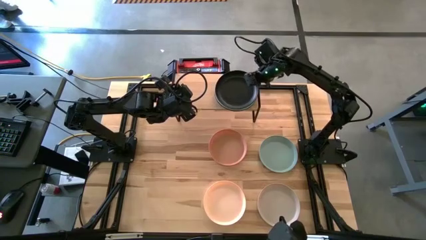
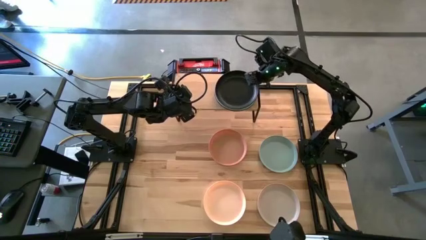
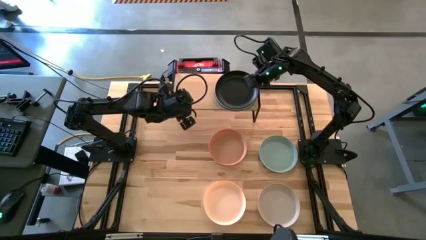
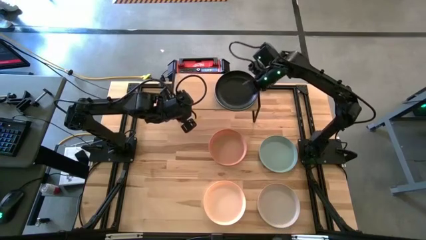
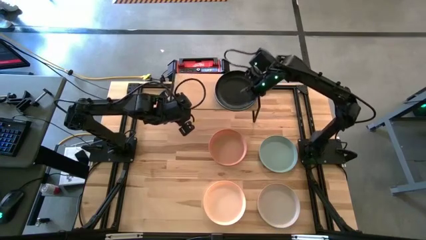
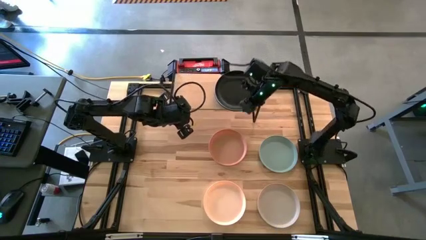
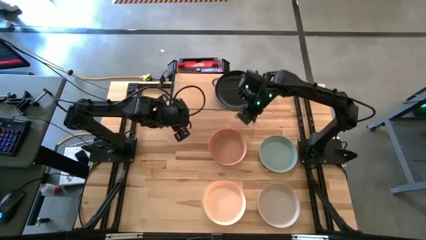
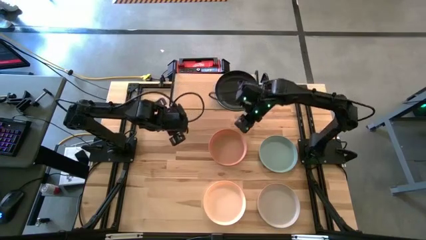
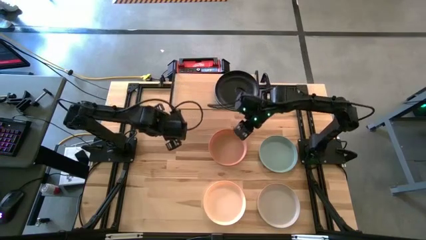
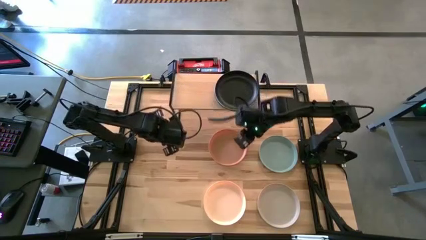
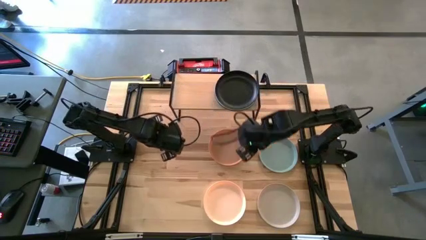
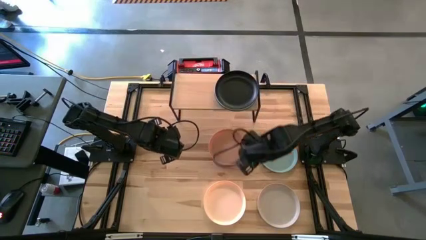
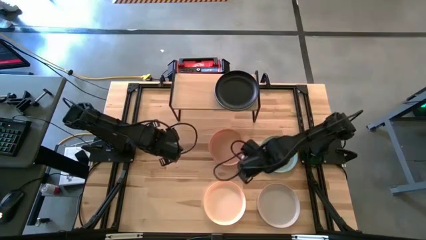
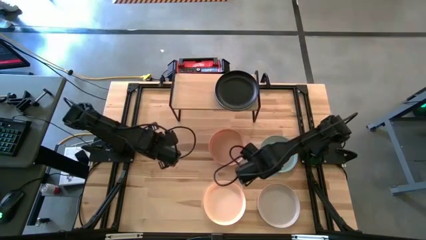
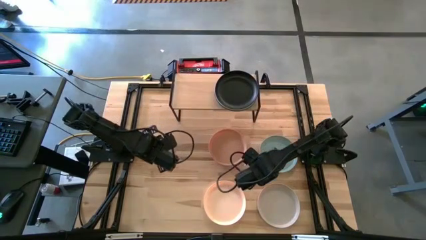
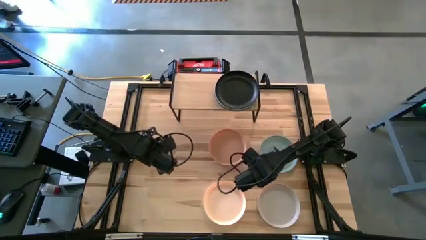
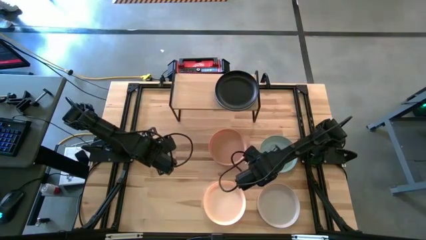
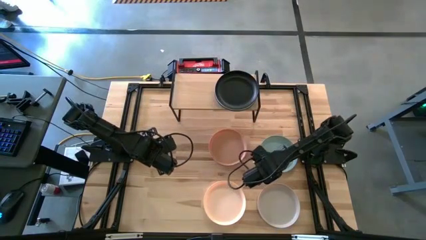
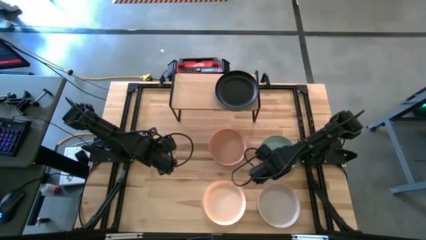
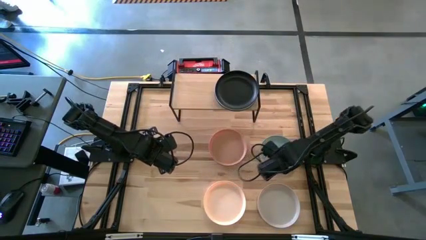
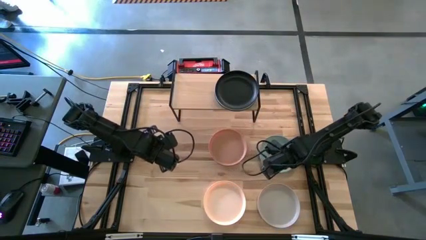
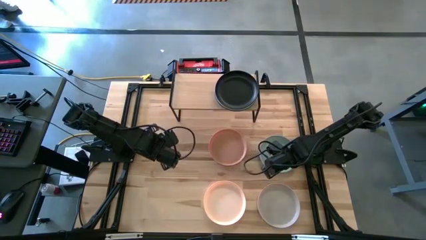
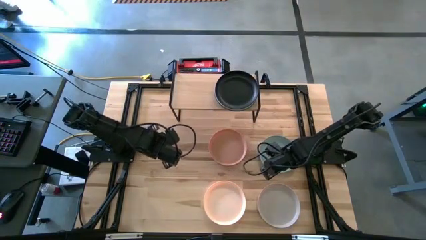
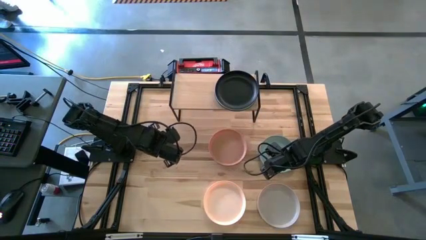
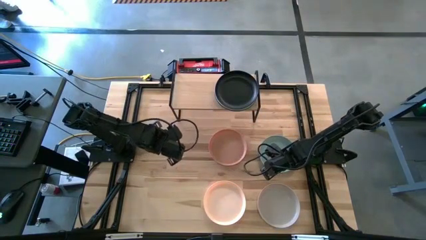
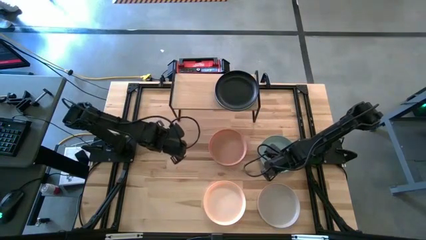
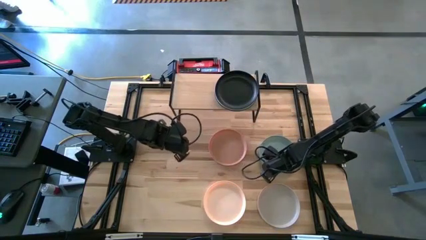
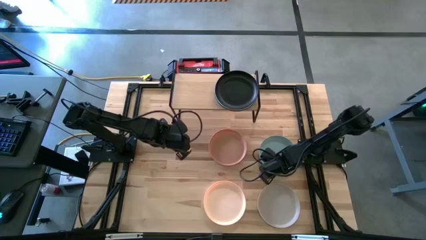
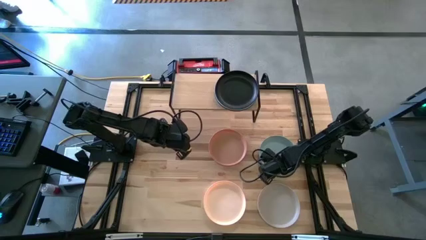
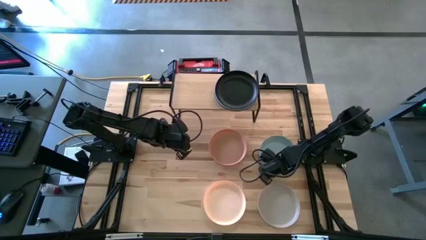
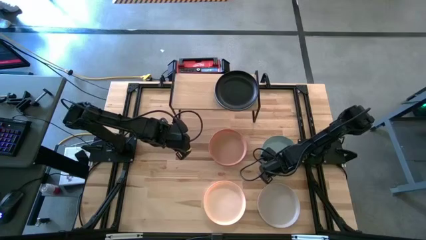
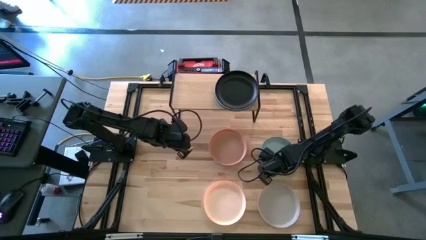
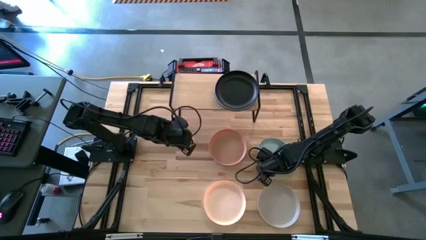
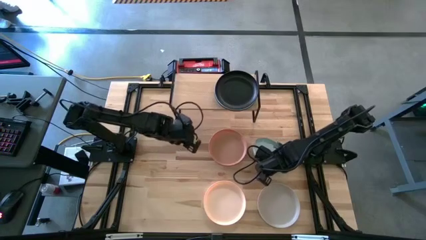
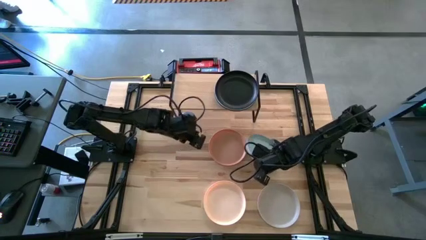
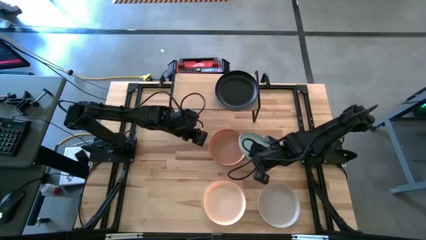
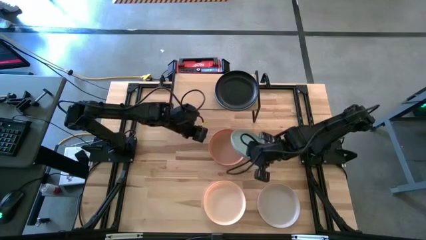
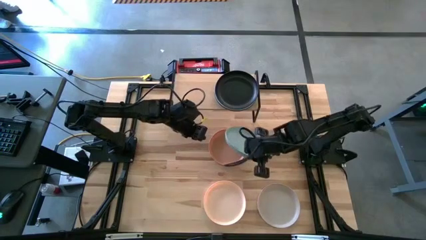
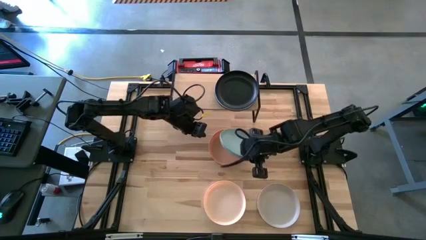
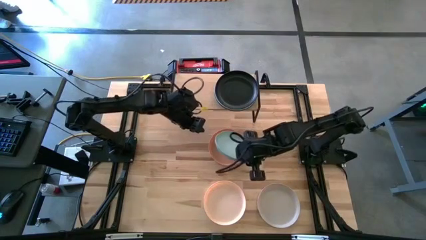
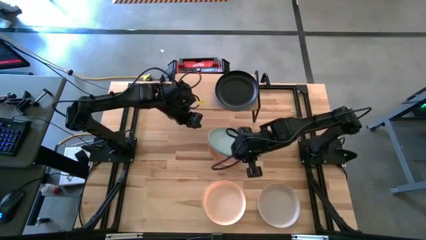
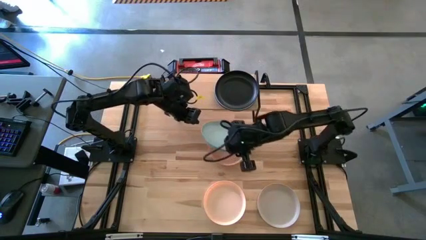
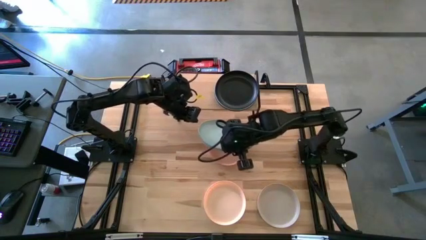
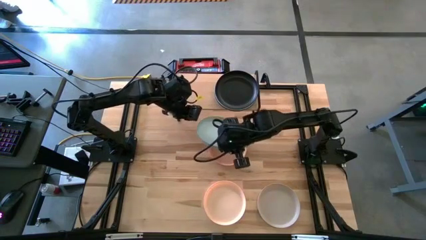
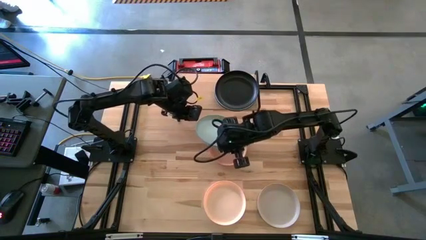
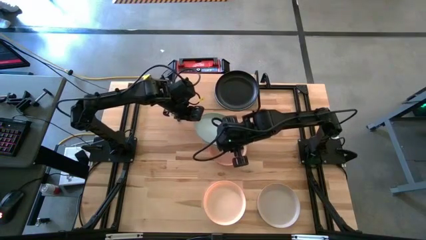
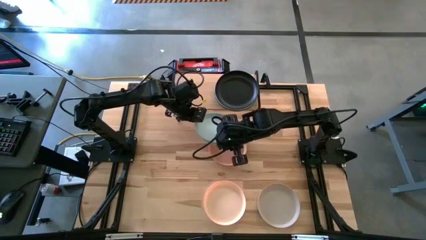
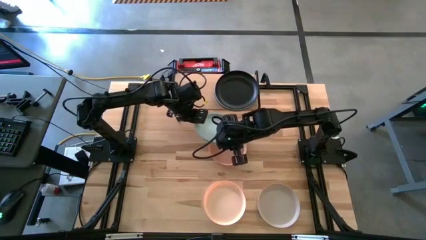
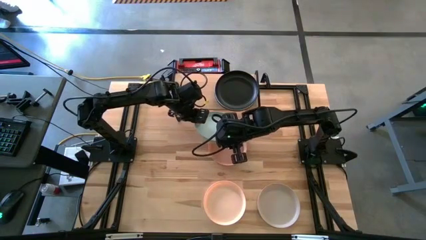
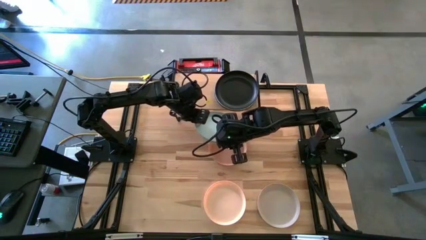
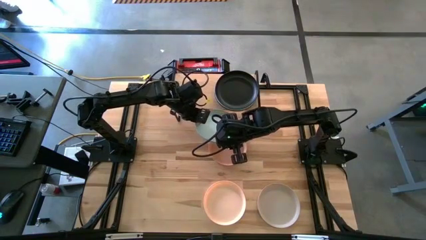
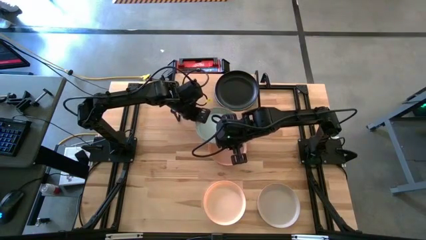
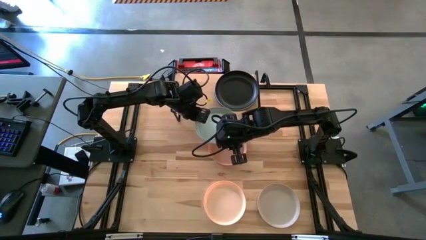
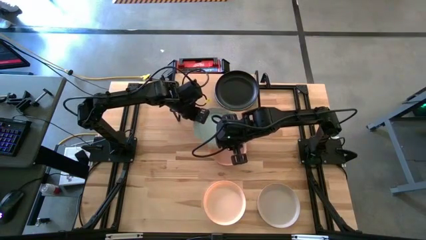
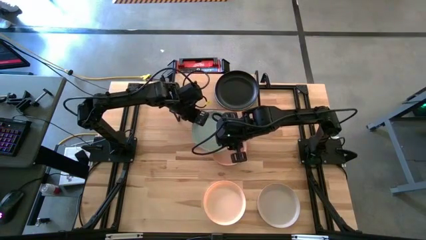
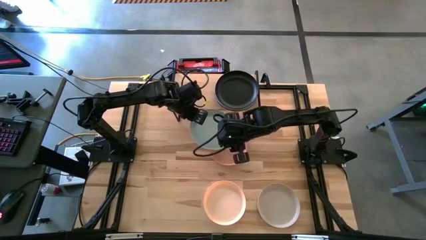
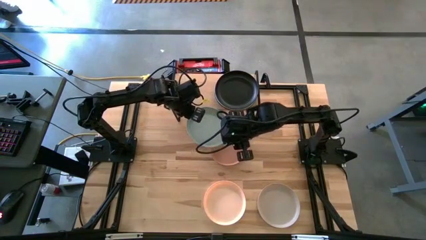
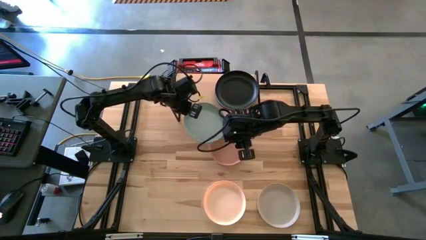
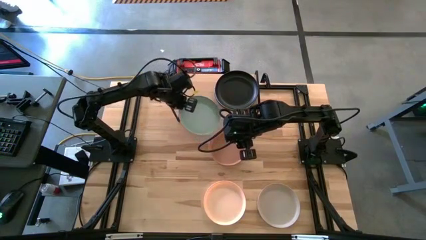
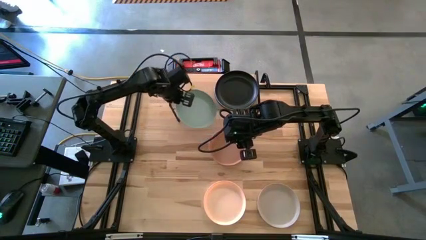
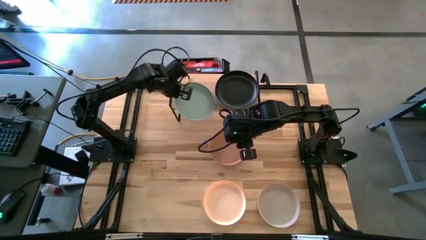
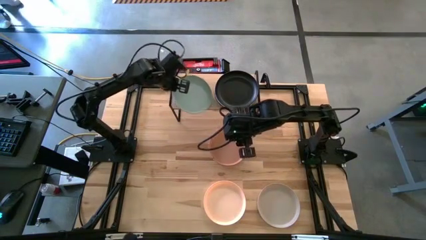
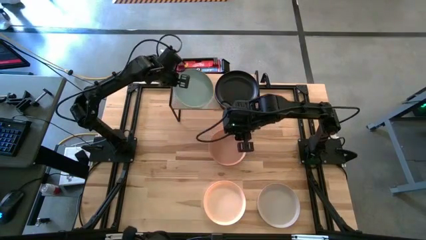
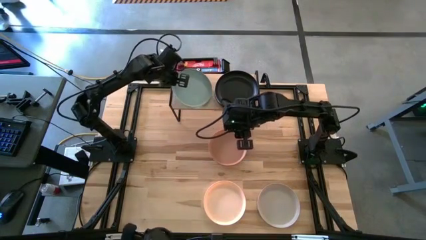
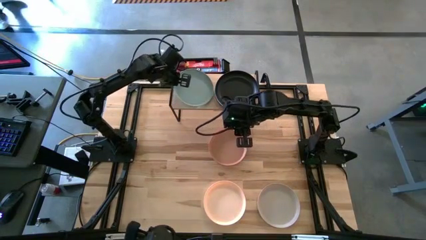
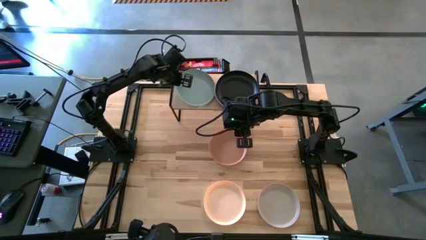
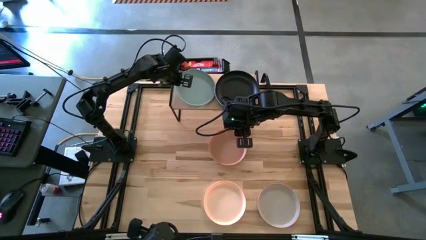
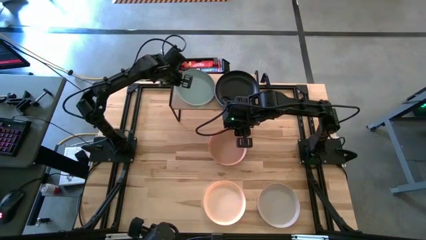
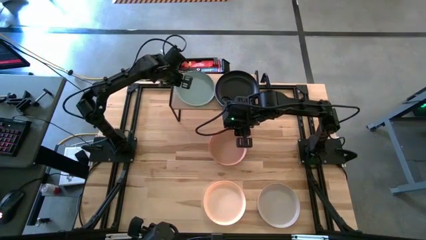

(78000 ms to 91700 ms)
Task: Place and stack plates onto a shelf
Put the green plate on the shelf
